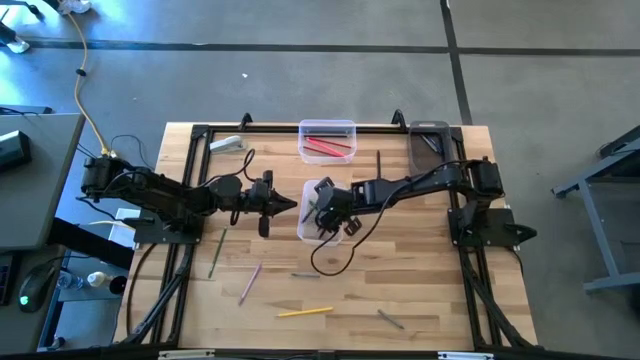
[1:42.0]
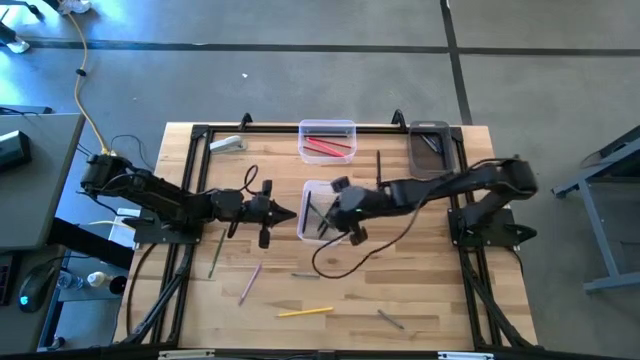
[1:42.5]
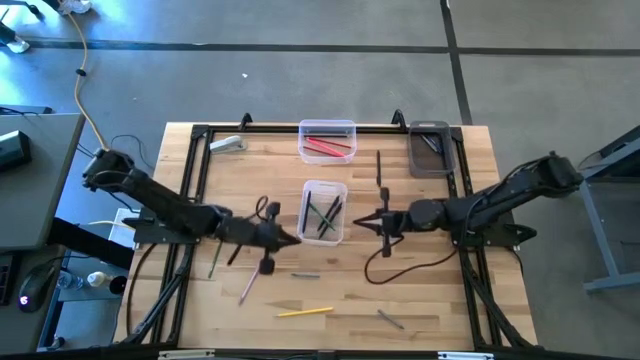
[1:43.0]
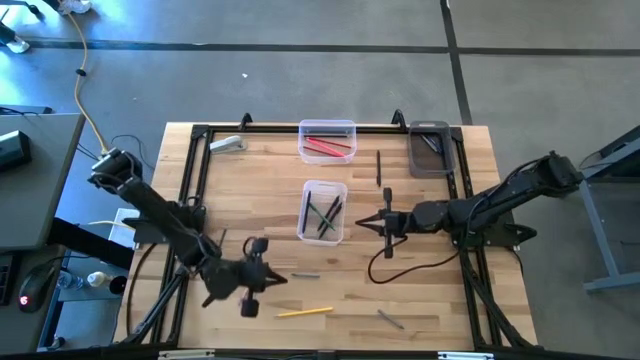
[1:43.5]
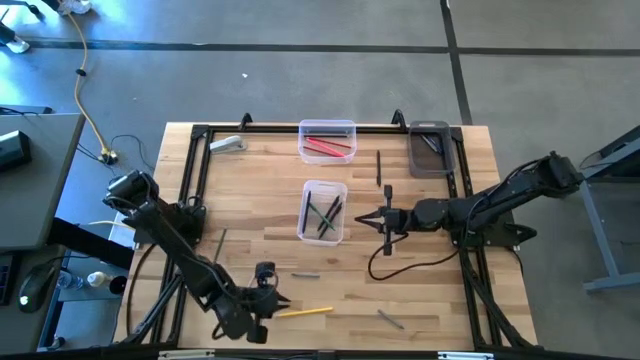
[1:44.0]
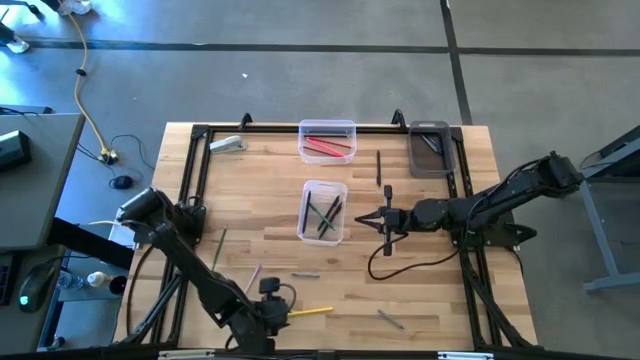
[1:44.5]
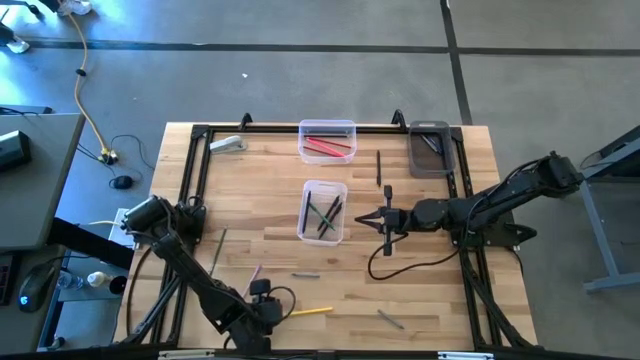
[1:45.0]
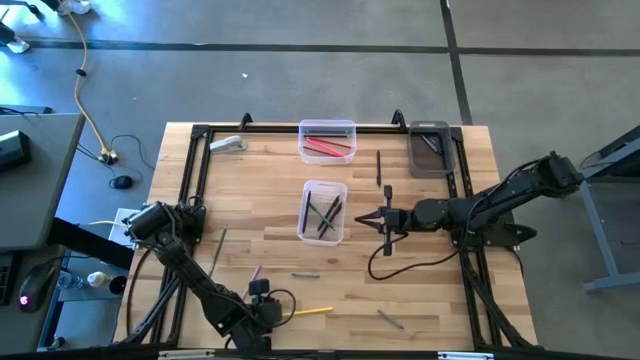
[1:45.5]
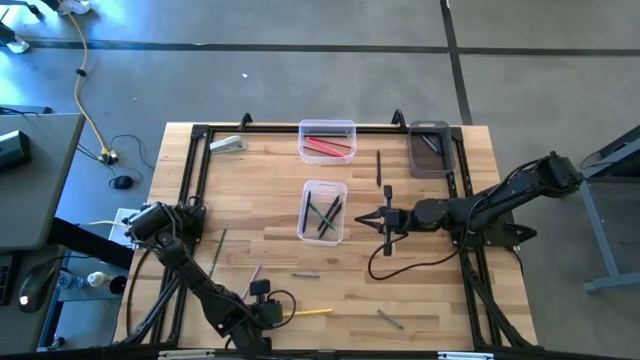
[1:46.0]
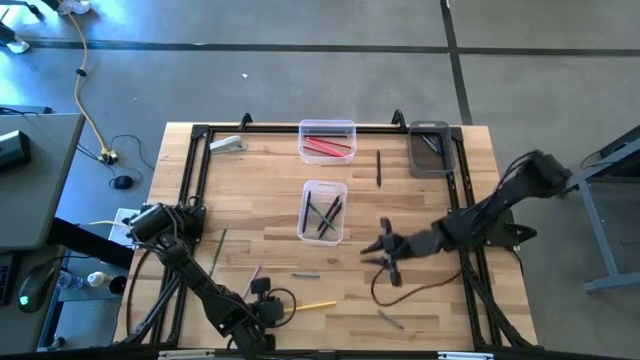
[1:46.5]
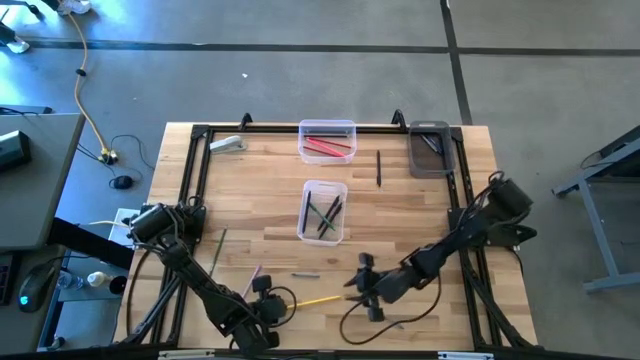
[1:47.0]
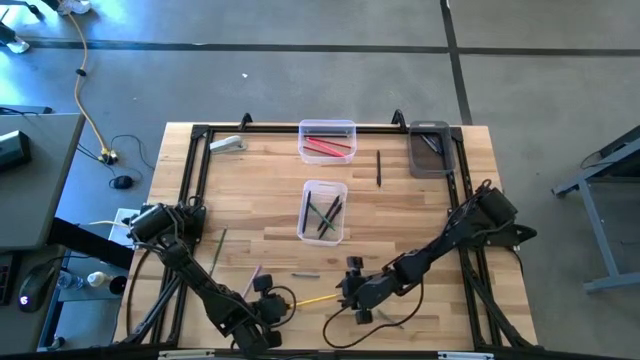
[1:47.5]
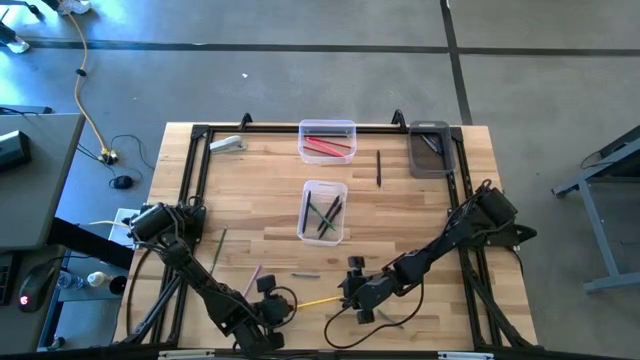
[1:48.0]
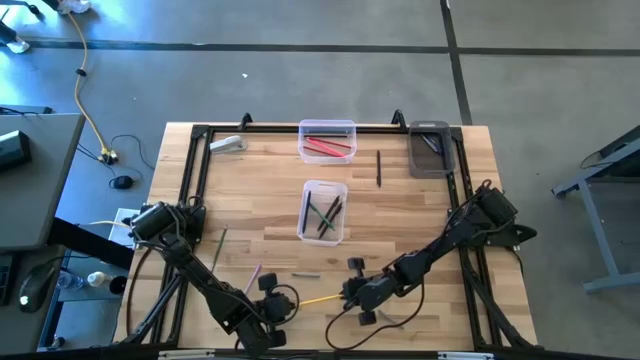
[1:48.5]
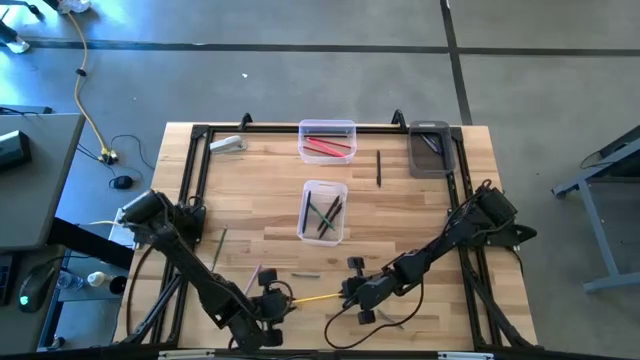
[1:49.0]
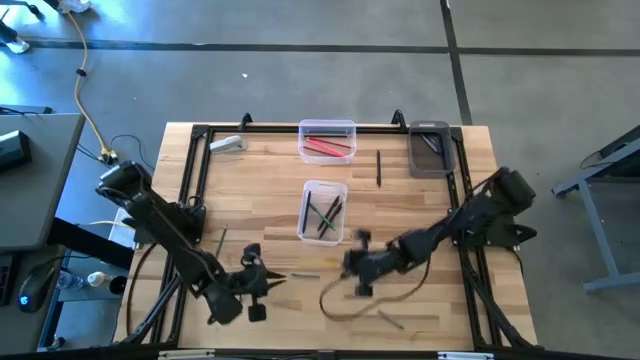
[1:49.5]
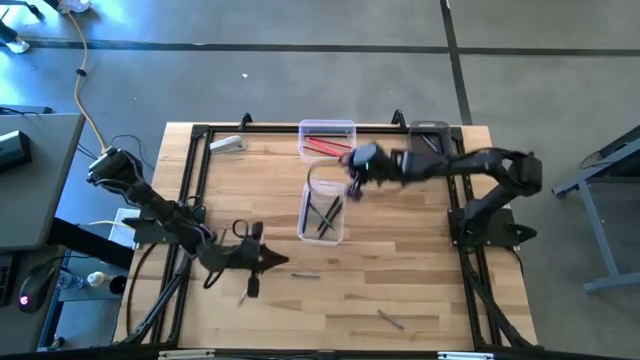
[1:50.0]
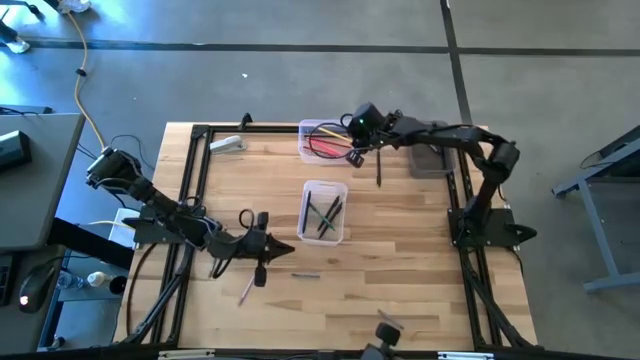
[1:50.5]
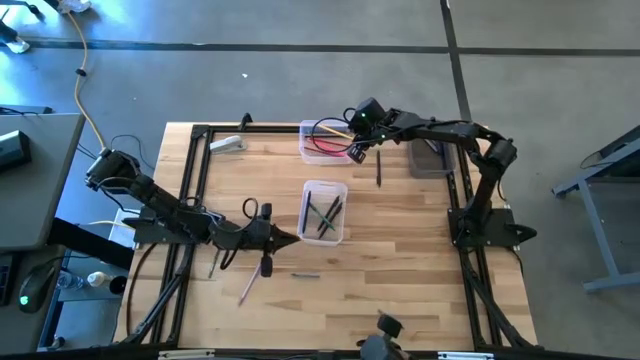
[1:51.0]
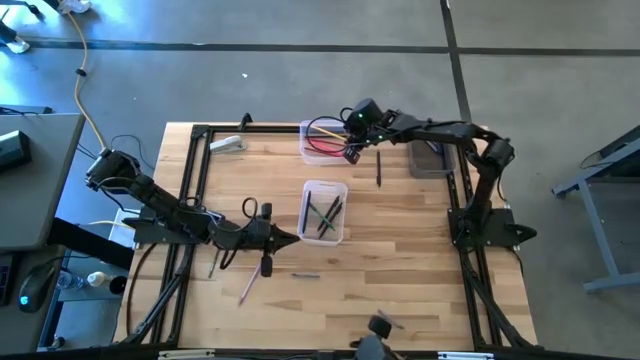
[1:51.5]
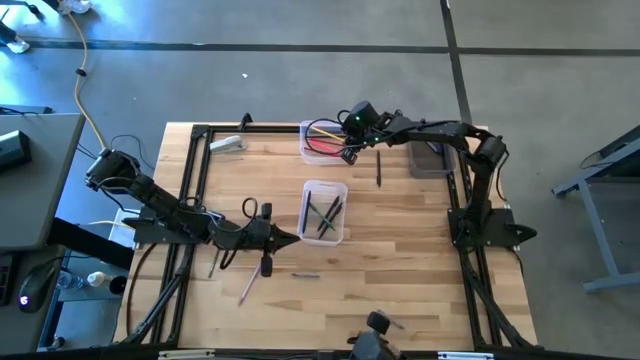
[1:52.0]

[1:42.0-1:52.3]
Task: Sort crayons/erasers/pens/pencils in bins
Put the yellow color pencil into the top transparent bin

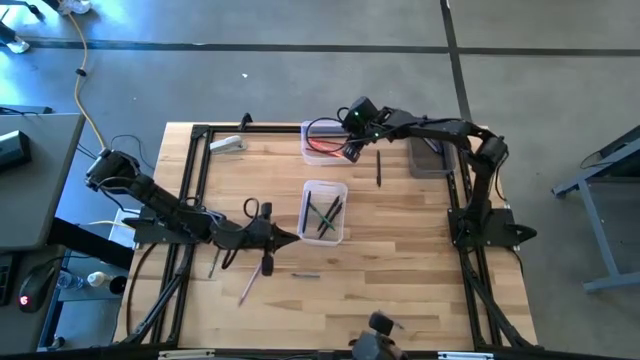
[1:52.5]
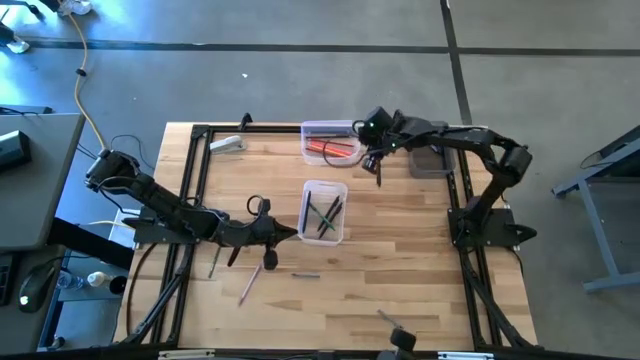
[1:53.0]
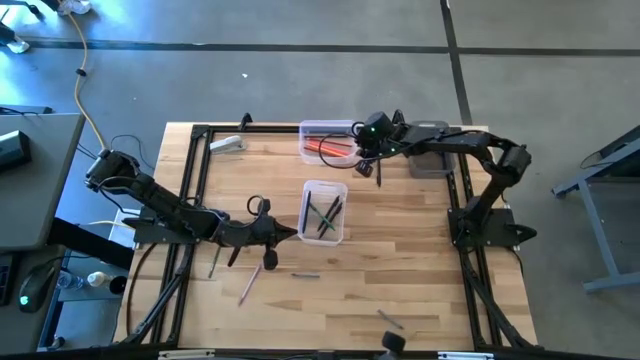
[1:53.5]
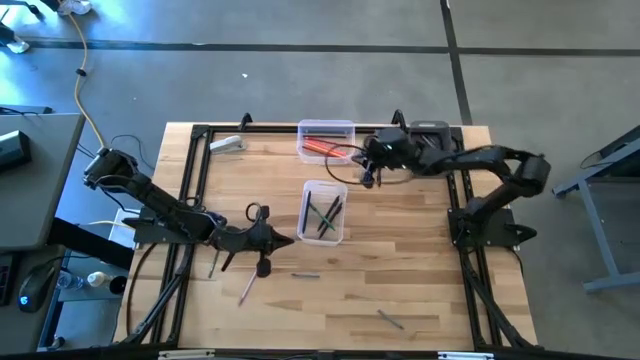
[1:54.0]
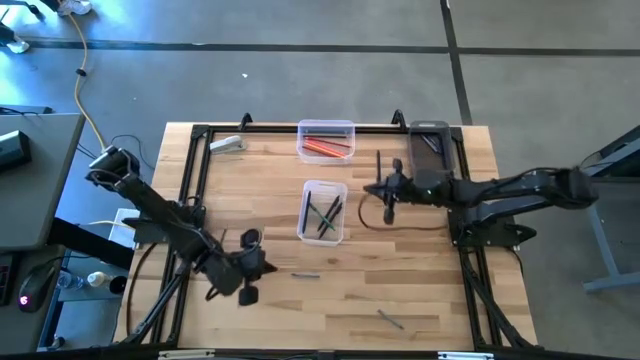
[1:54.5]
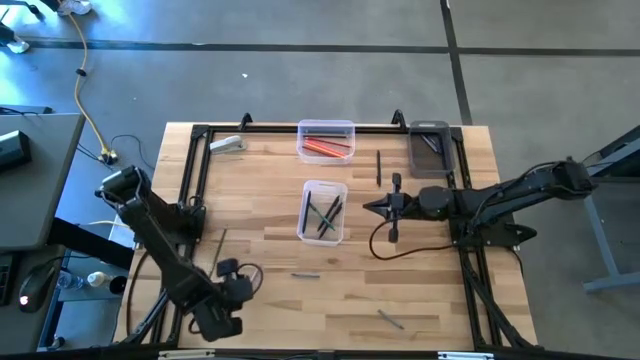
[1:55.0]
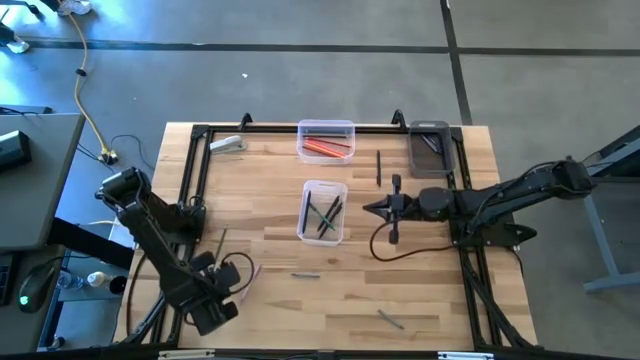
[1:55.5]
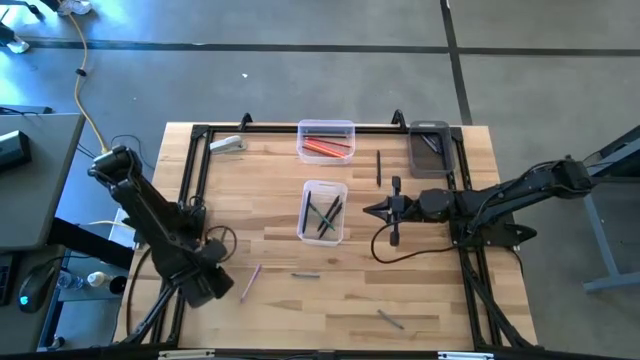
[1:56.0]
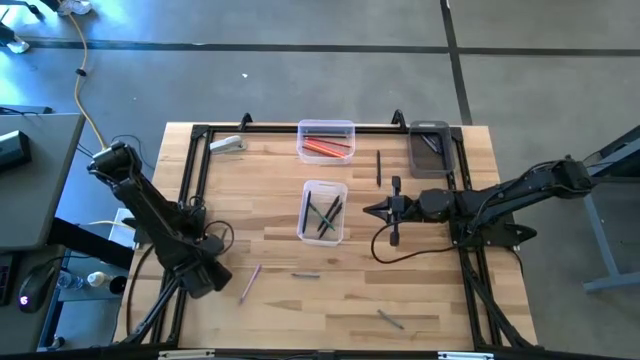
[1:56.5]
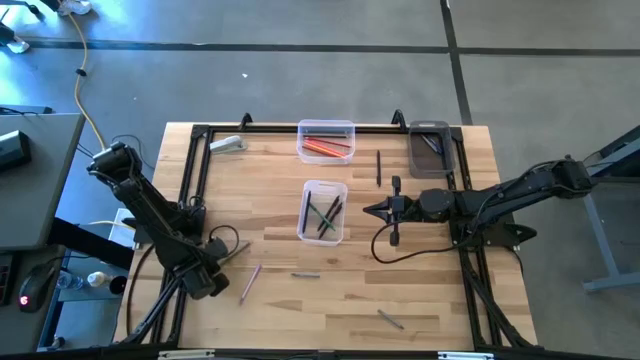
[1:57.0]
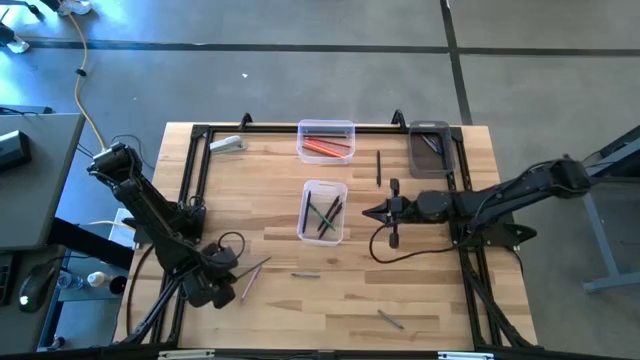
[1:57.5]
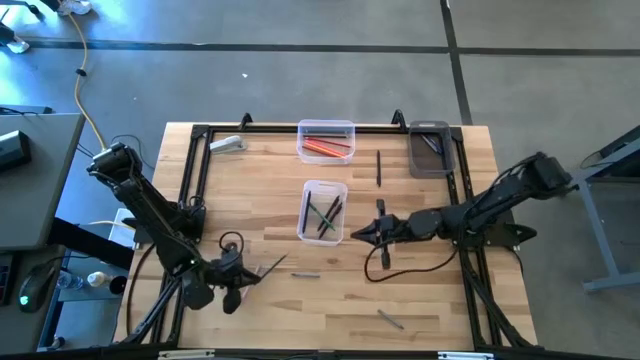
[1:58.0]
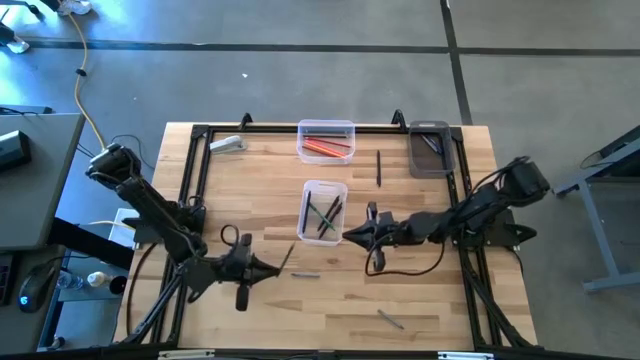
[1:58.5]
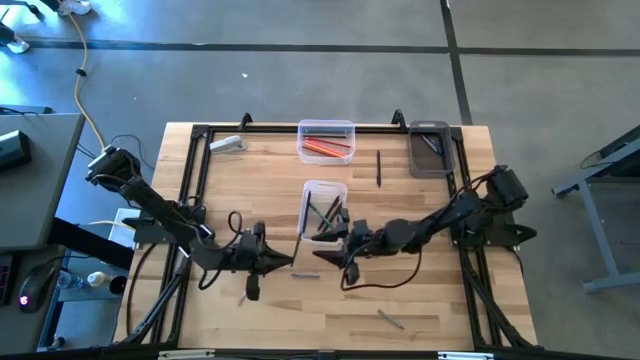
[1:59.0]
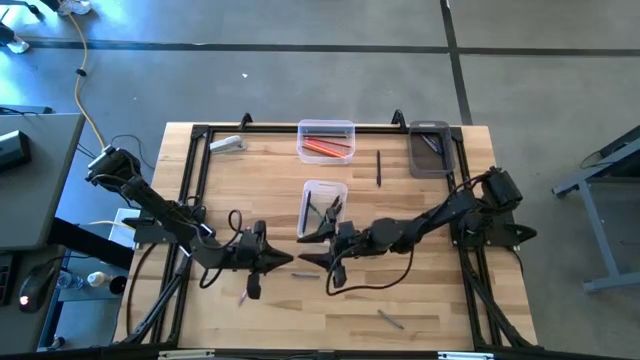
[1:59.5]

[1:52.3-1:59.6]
Put the green color pencil into the top transparent bin

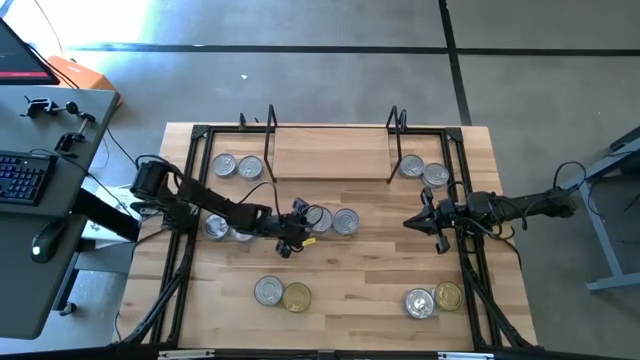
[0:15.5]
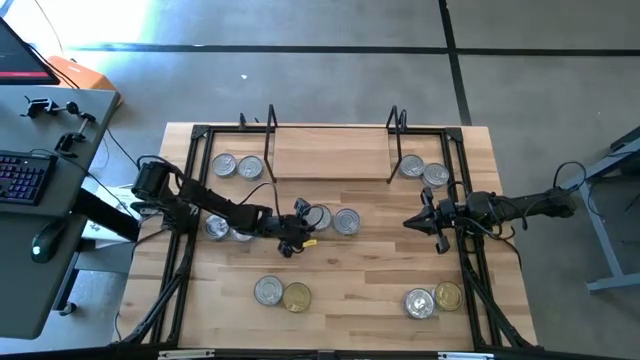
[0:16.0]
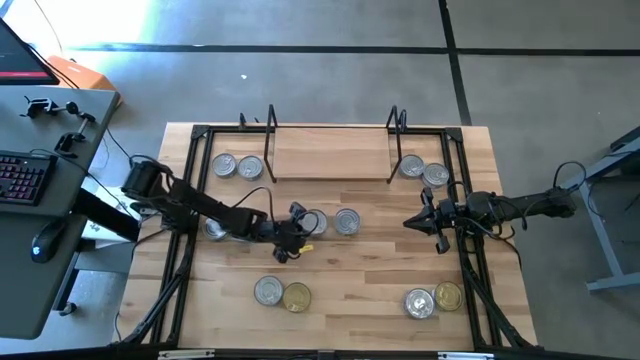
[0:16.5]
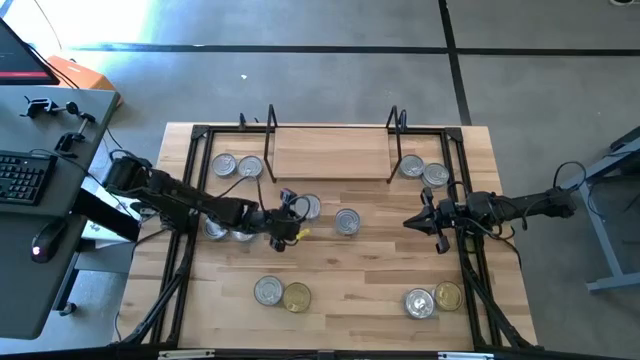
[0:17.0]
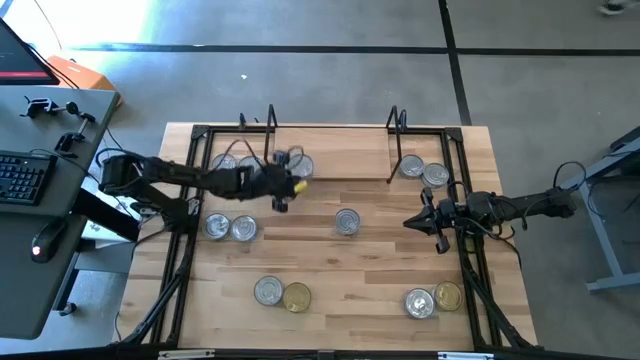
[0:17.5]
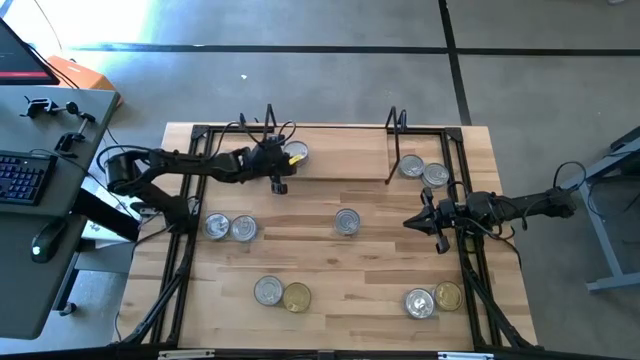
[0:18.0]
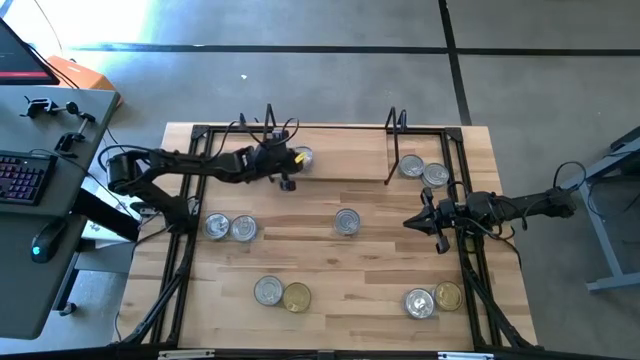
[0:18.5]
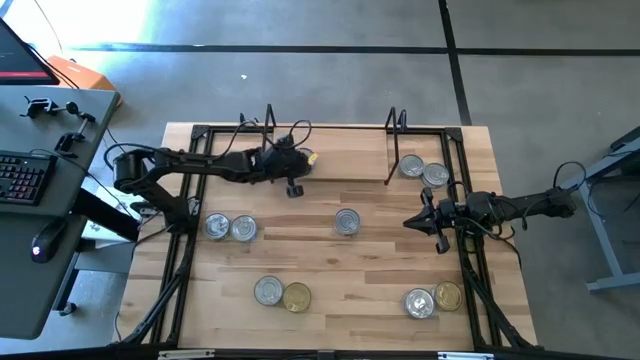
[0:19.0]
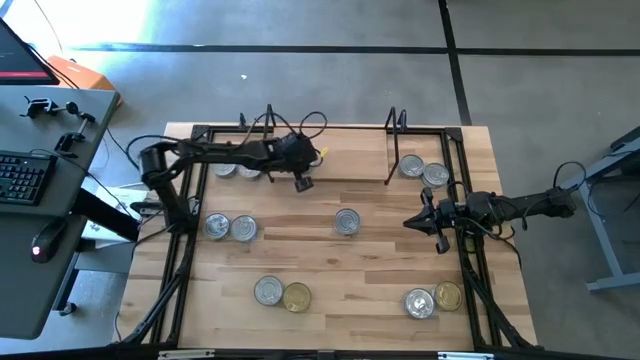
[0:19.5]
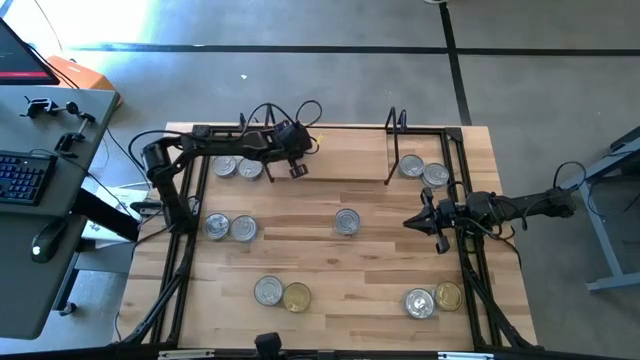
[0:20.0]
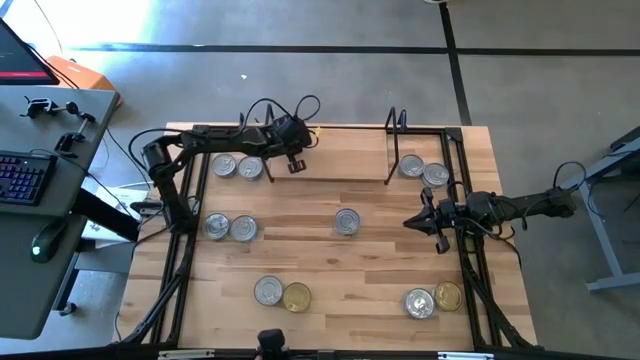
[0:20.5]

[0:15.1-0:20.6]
Task: Stack canned seafood by type on shelf
Put the blue tuna can on the shelf
